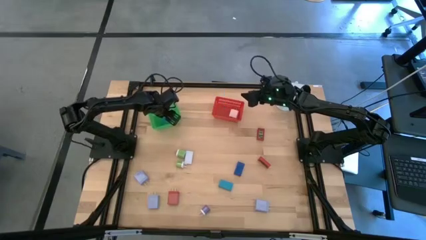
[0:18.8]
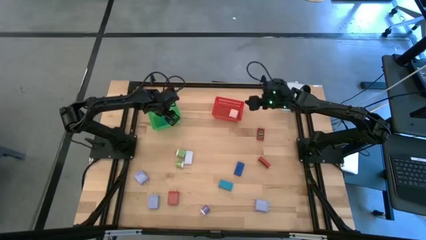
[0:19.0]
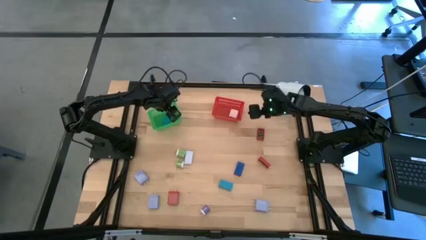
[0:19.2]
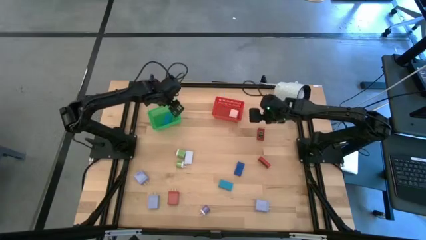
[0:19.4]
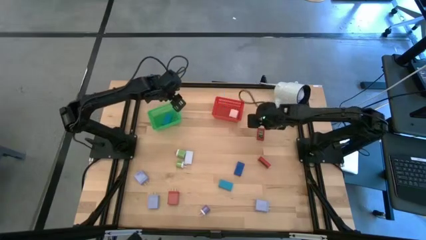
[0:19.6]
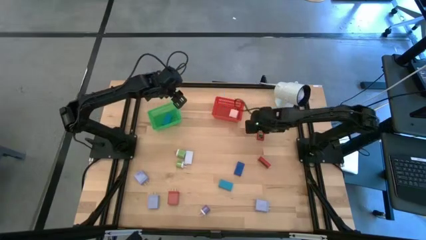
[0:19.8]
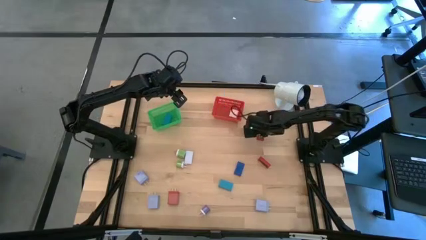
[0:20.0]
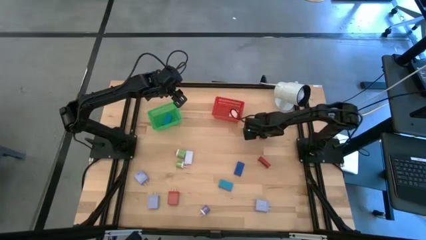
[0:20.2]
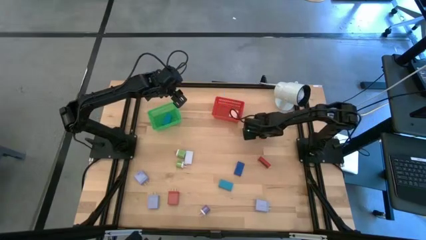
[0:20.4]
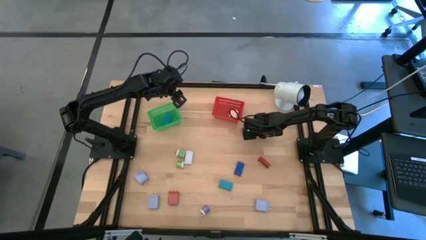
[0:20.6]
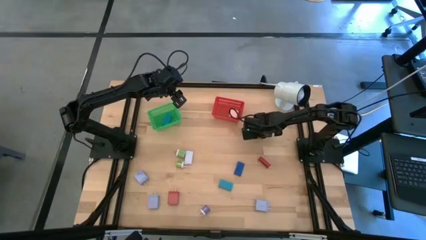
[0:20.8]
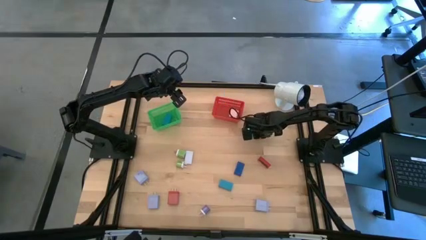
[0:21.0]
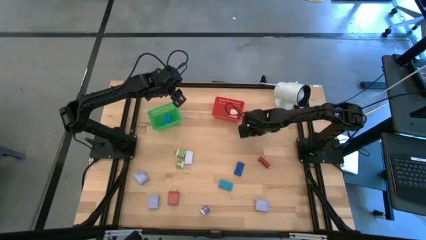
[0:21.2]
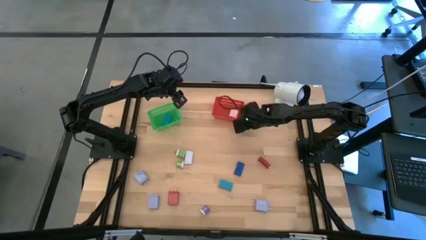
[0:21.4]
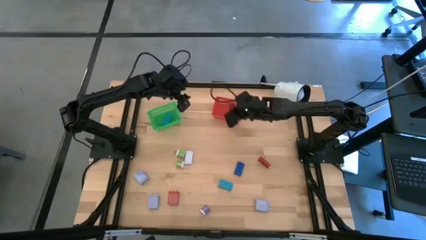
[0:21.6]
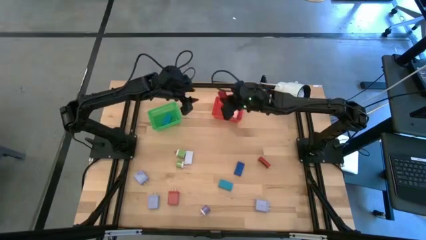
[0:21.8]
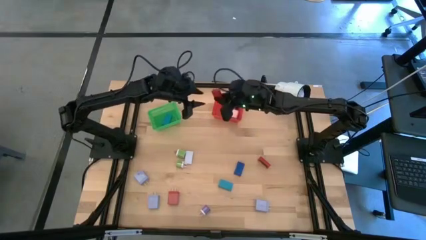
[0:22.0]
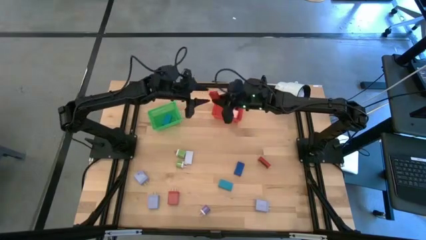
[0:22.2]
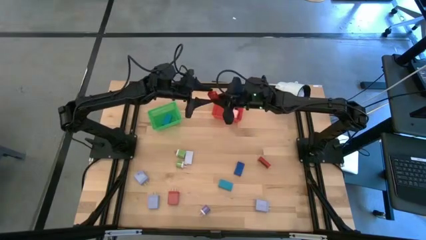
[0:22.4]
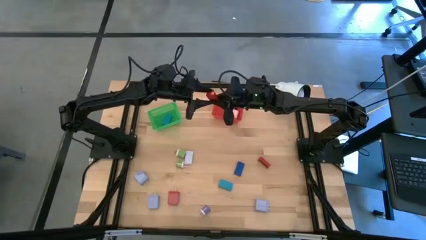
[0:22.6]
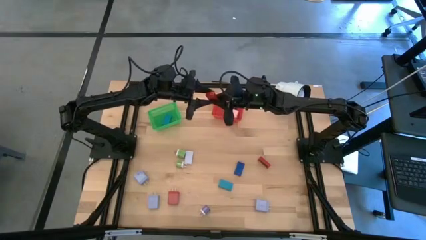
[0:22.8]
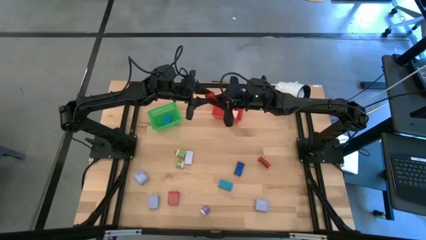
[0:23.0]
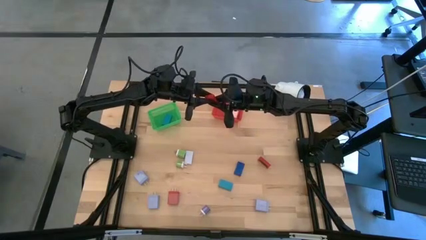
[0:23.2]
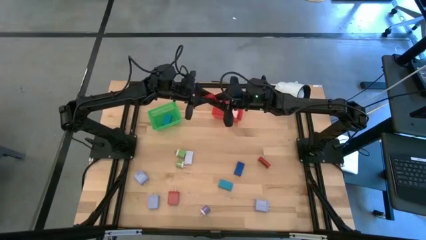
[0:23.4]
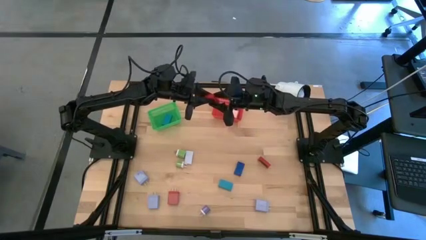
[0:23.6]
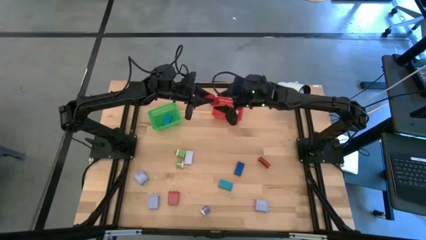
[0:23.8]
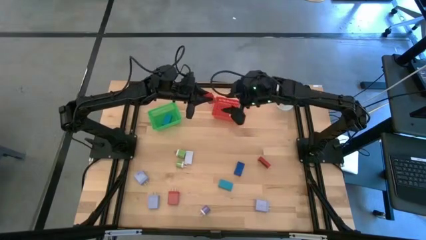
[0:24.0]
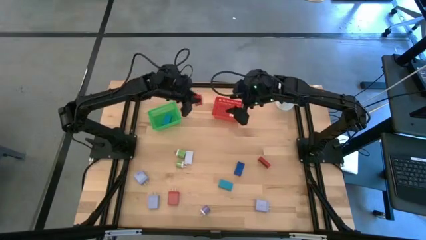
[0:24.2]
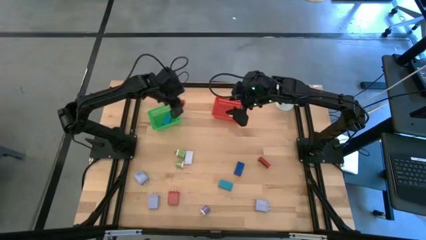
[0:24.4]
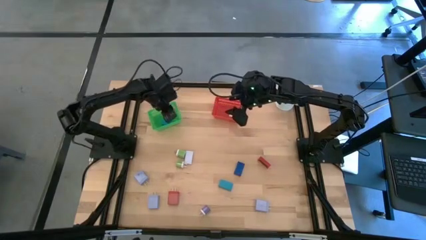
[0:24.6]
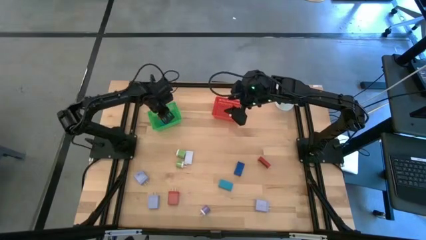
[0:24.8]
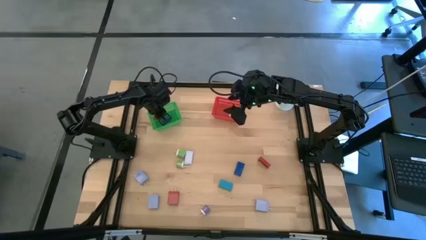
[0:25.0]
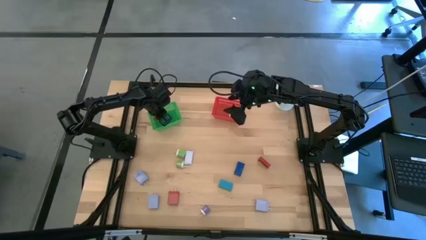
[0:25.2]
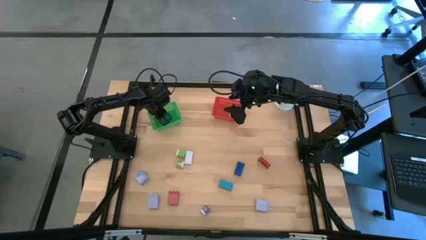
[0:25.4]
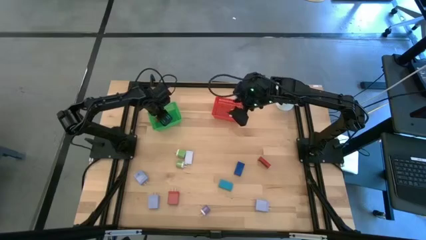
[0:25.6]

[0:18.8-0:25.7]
Task: Pick & Place Office items
Put the top red digital clock into the green bin

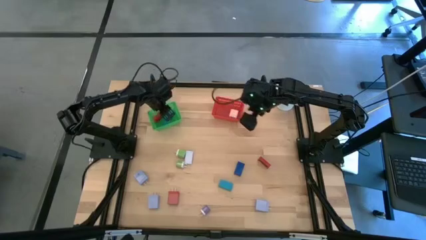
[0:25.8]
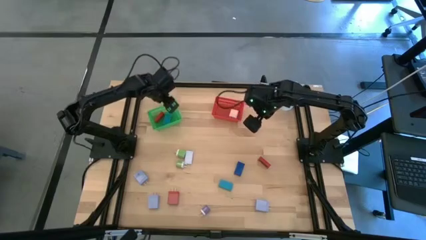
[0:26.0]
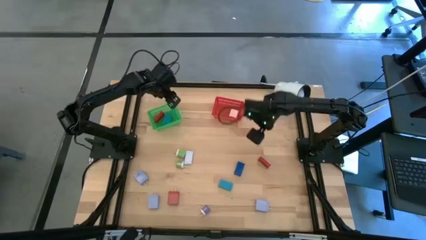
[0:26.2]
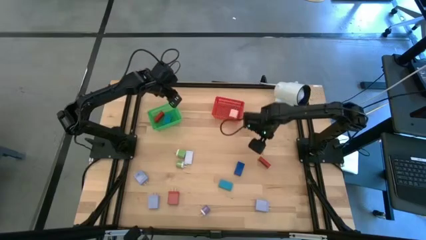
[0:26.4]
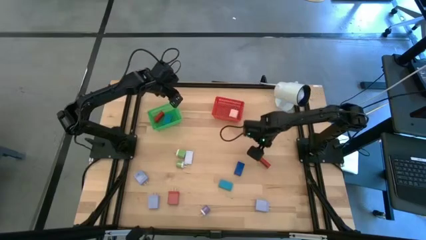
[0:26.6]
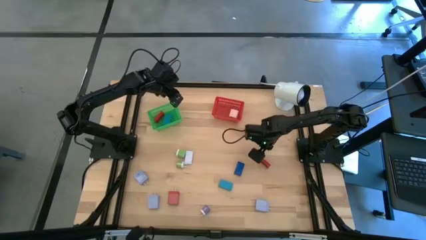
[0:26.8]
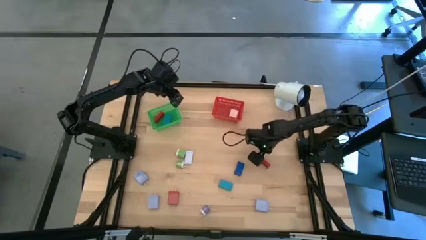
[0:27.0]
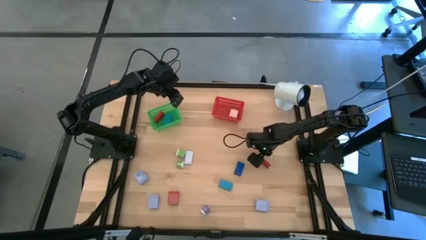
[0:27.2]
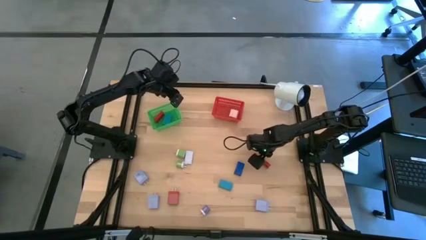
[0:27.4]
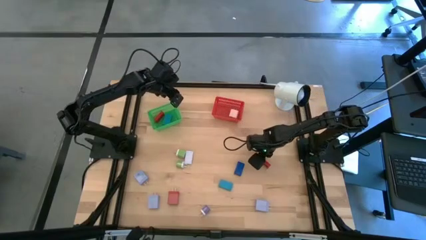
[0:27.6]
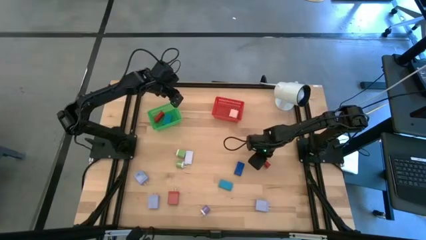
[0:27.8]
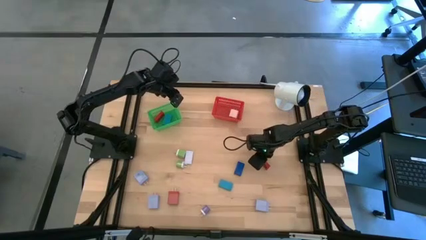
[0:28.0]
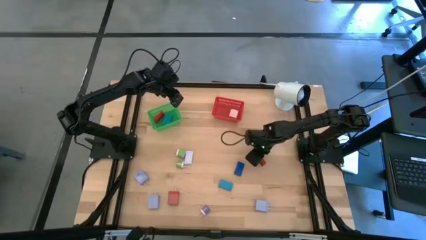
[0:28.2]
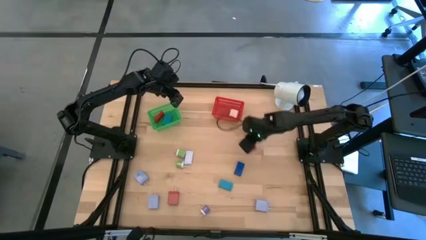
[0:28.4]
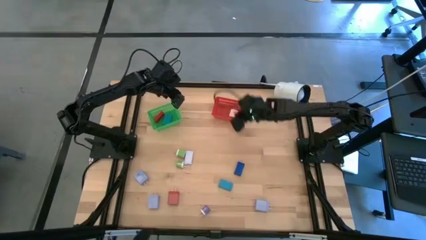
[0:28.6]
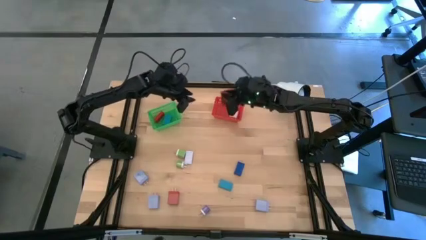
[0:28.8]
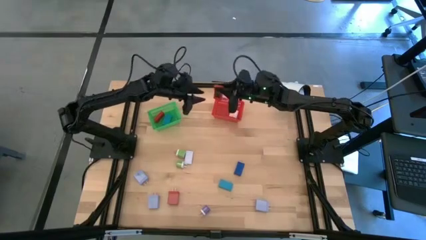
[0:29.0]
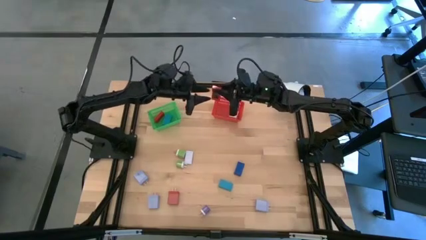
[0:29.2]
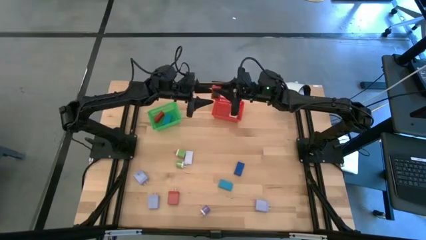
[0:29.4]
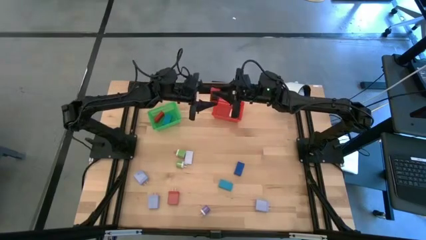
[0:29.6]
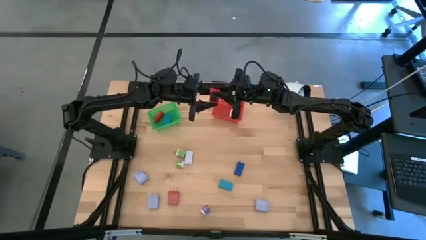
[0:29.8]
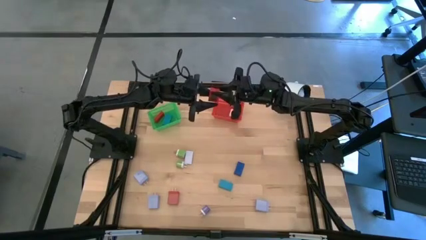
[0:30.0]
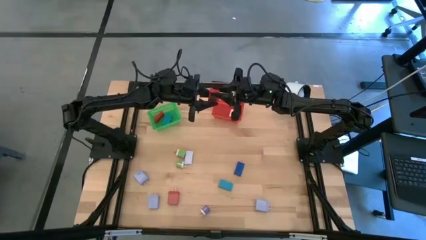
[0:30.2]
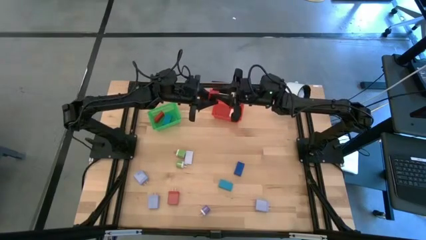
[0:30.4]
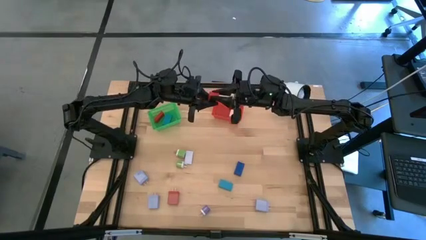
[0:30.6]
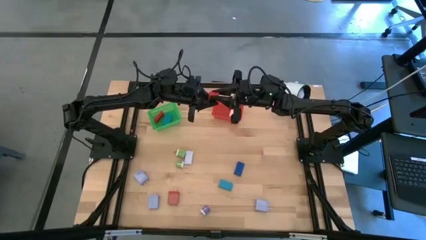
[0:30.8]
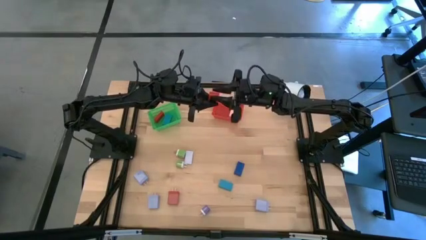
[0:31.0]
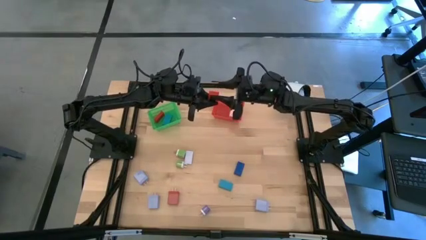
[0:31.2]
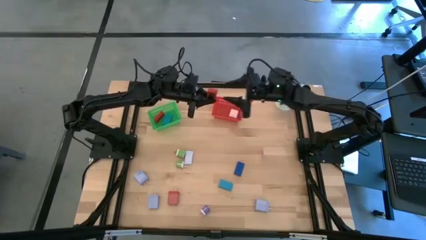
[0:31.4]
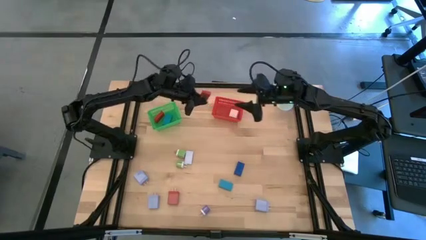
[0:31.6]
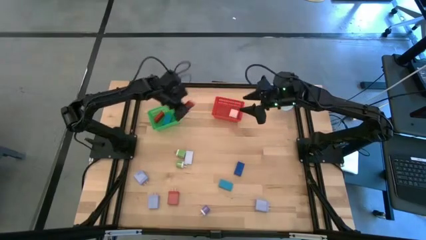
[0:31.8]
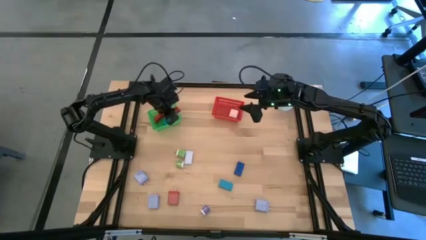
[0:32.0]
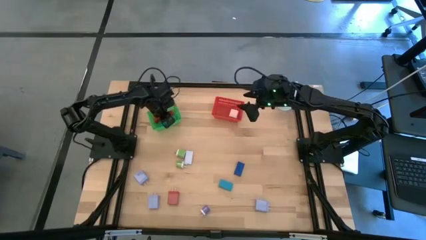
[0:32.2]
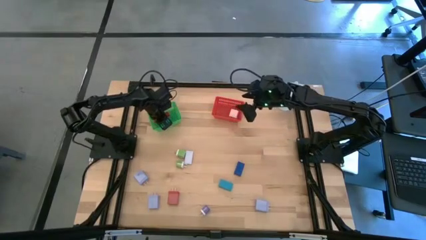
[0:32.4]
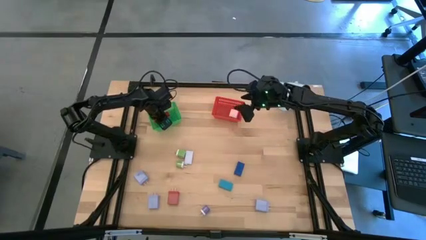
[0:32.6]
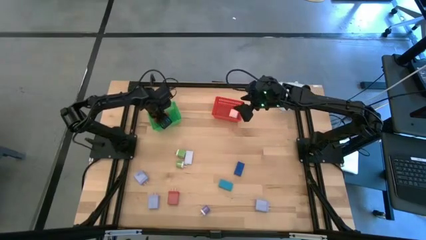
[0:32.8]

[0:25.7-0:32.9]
Put the red digital clock into the green bin

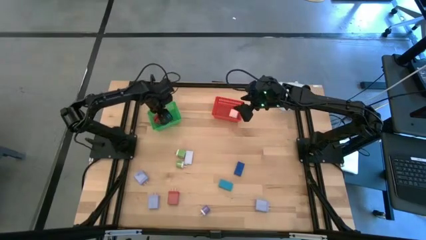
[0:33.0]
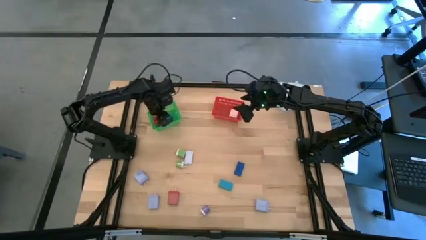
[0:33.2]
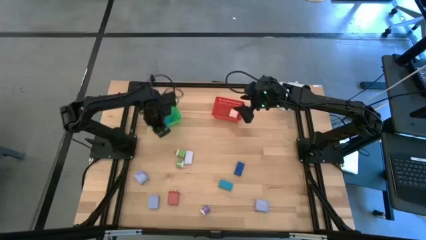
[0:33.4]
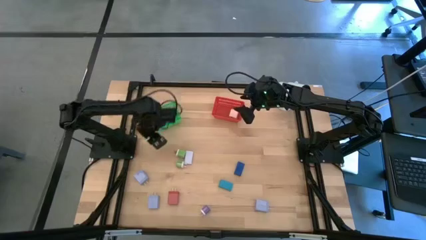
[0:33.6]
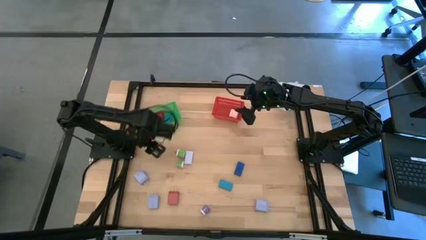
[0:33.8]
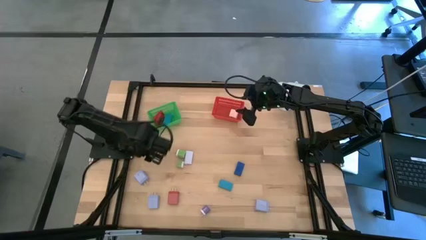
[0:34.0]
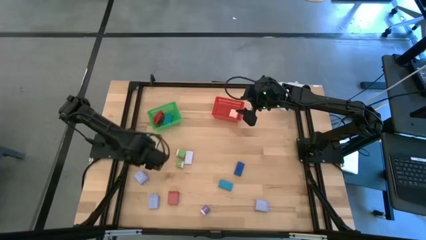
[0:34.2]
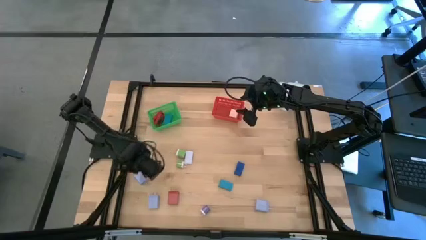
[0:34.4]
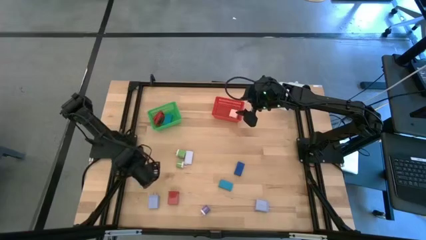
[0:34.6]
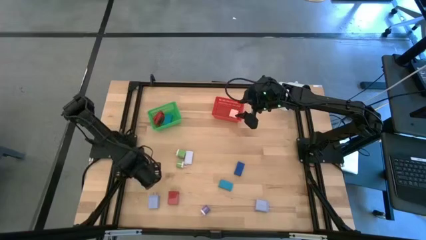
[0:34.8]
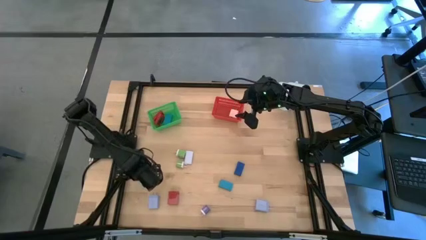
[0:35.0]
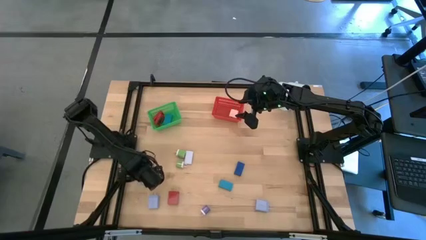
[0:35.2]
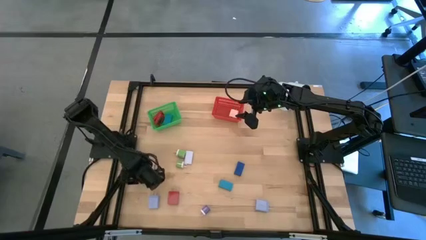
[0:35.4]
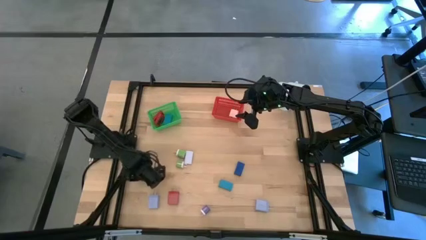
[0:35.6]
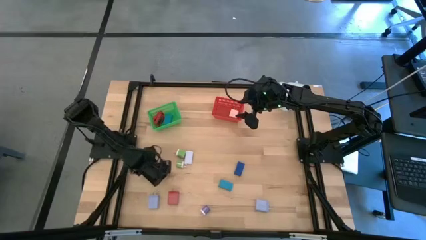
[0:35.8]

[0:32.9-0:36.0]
Put the top left purple charger adapter into the red bin
